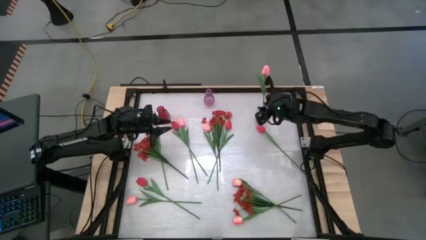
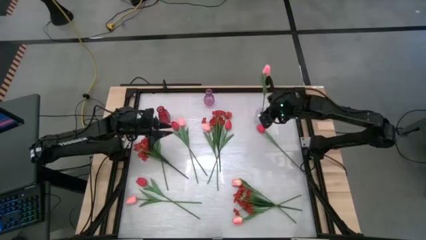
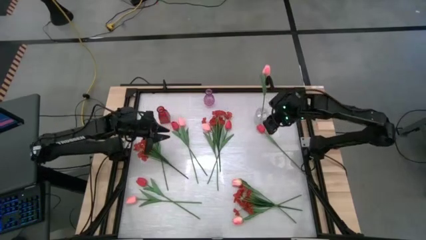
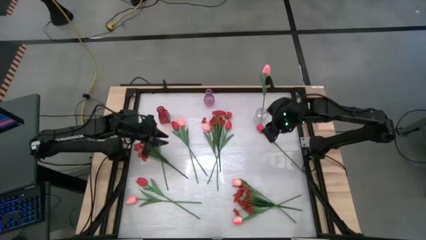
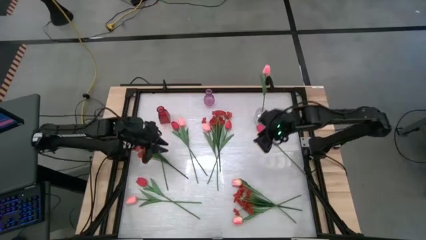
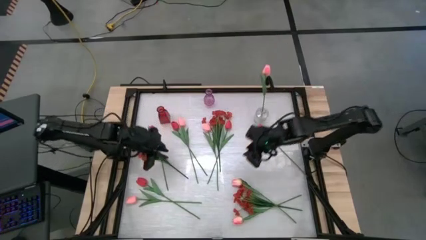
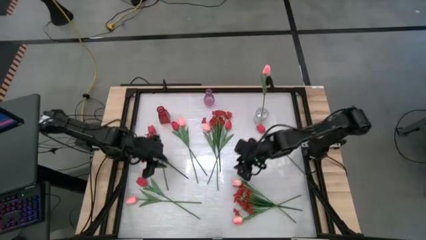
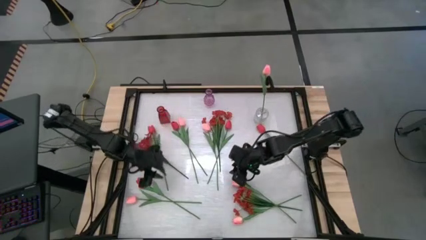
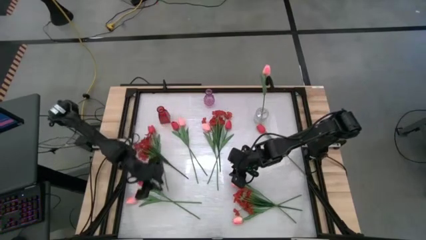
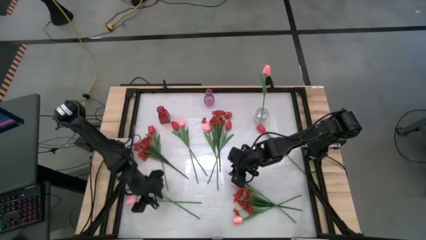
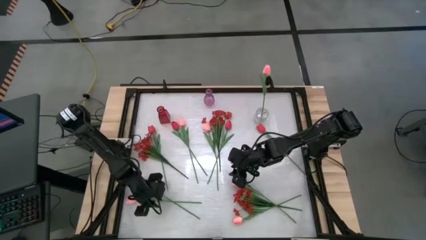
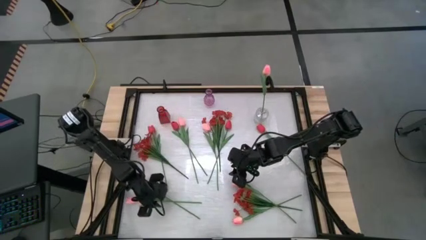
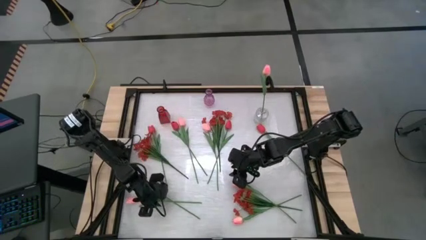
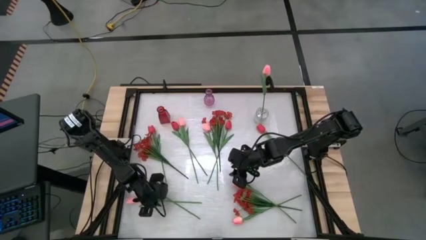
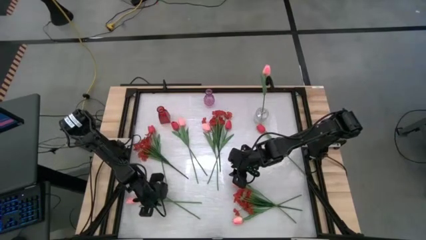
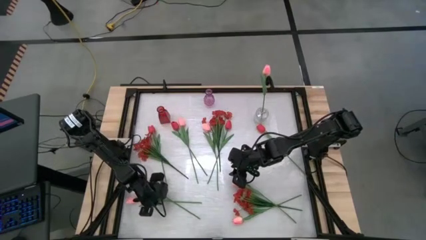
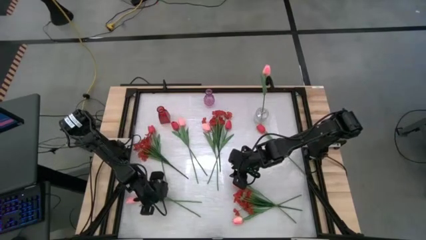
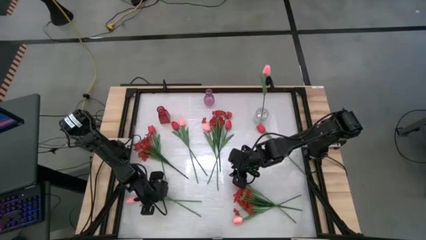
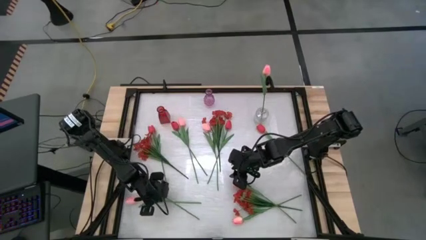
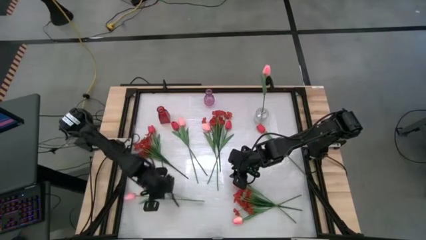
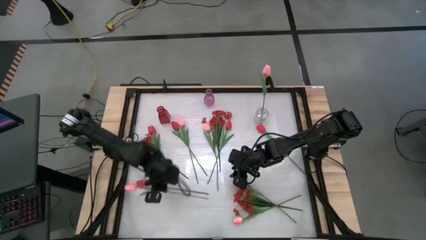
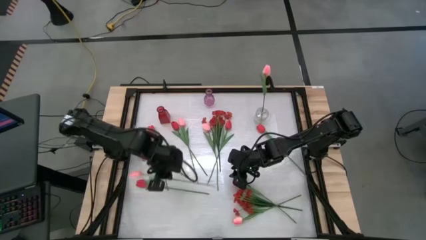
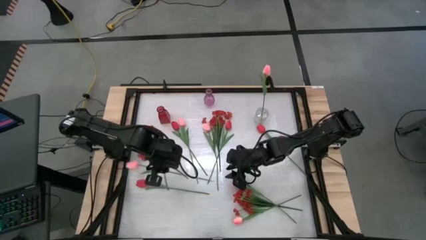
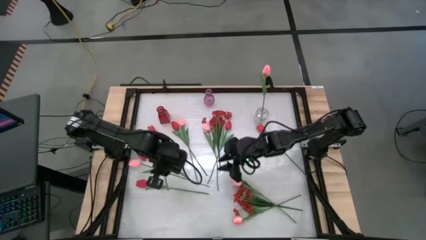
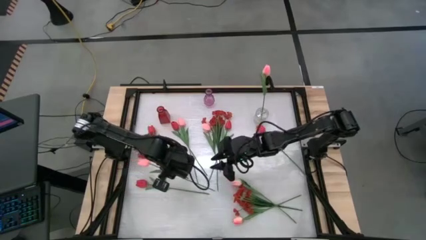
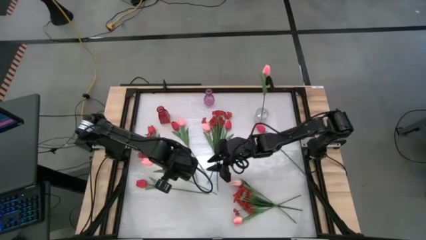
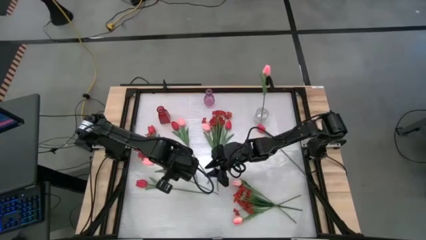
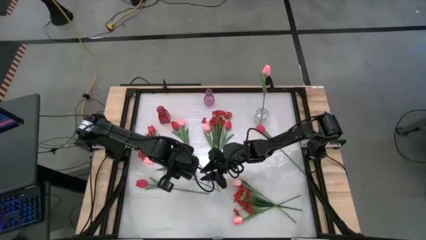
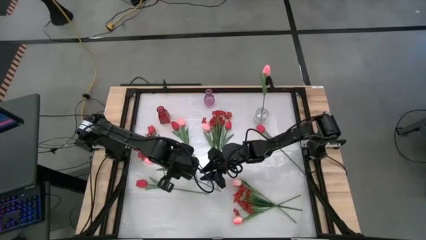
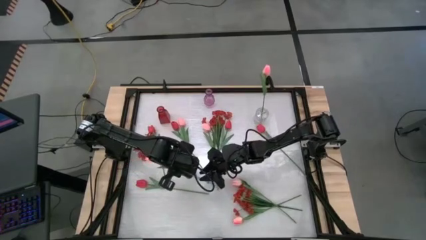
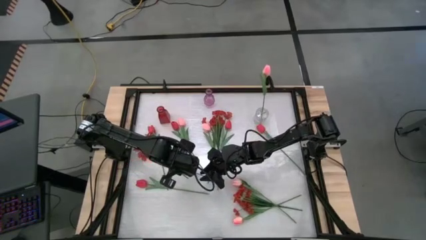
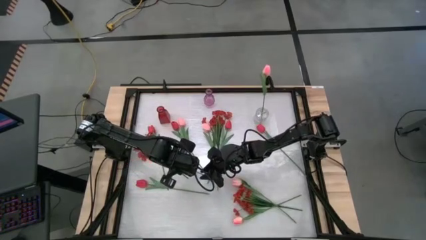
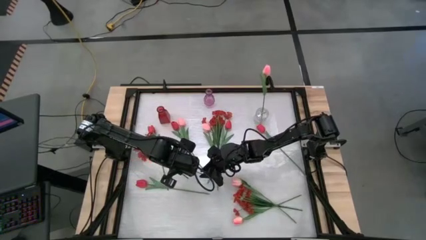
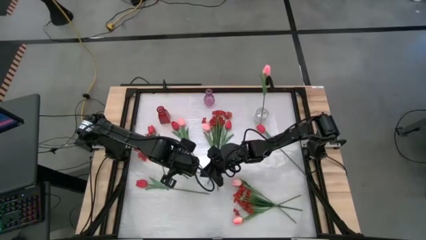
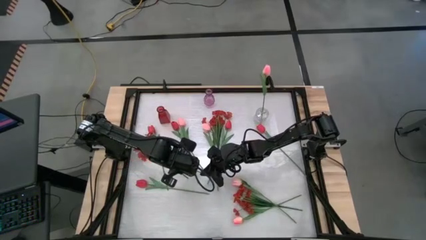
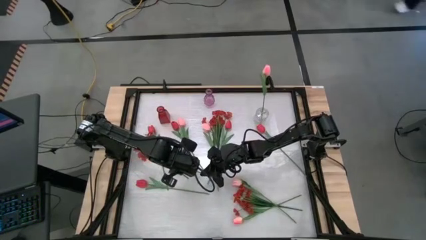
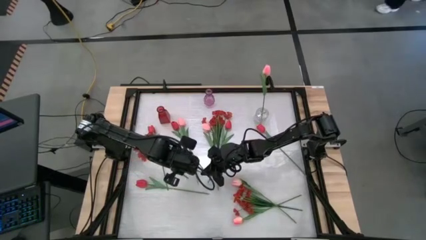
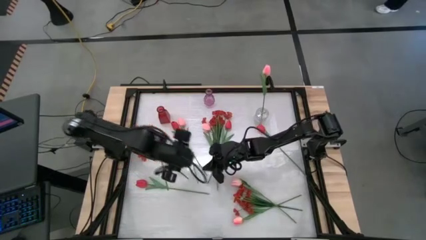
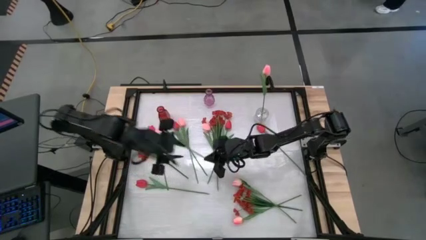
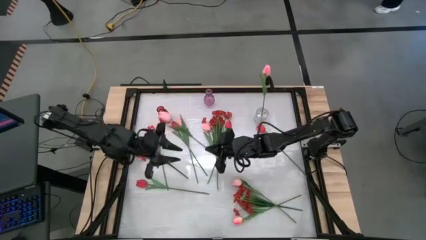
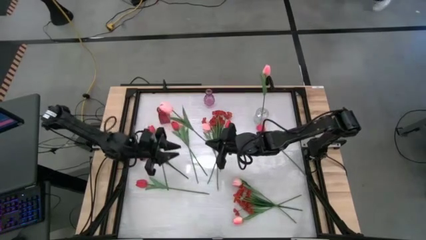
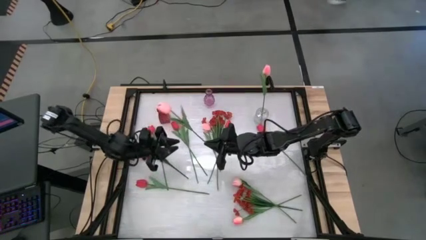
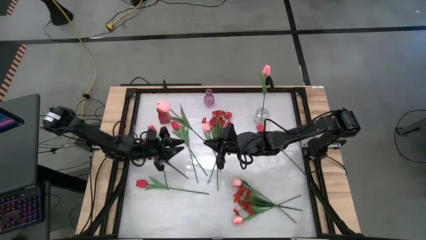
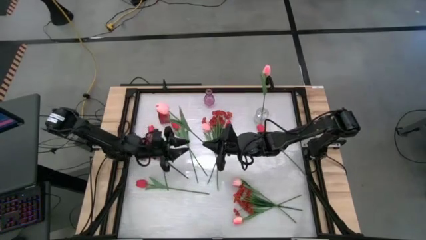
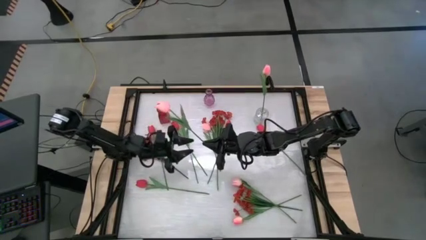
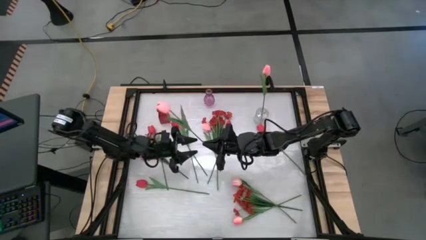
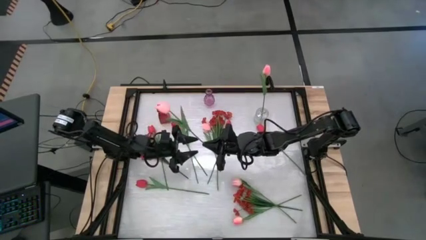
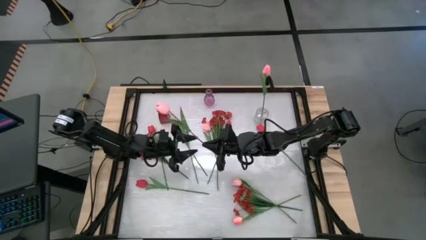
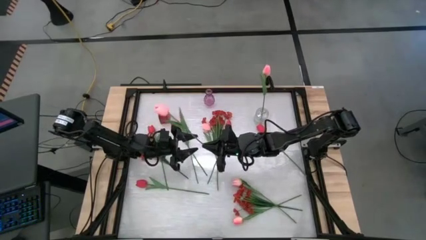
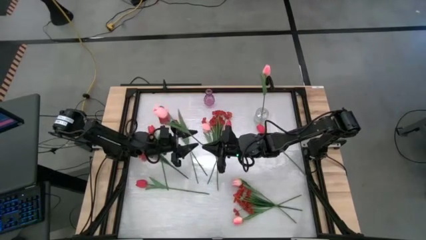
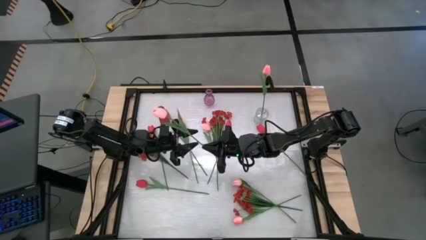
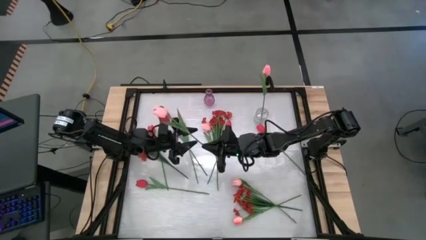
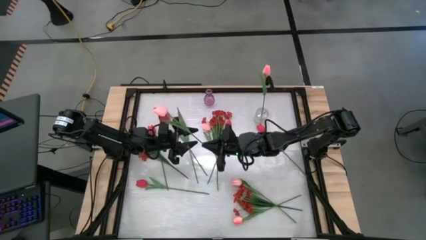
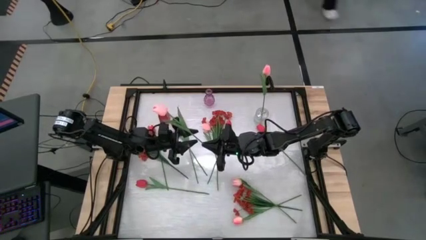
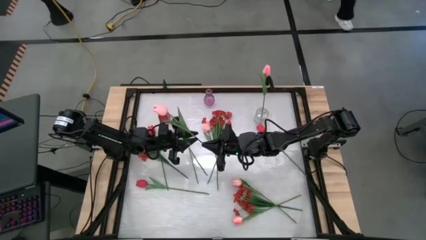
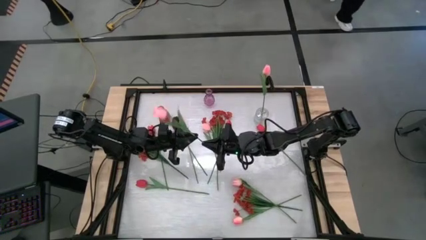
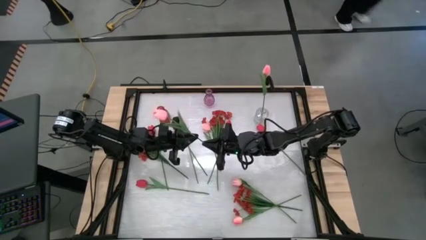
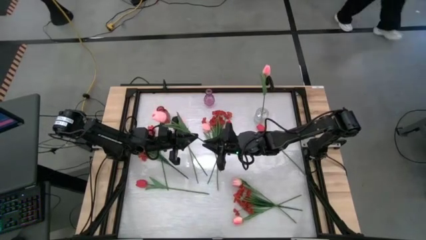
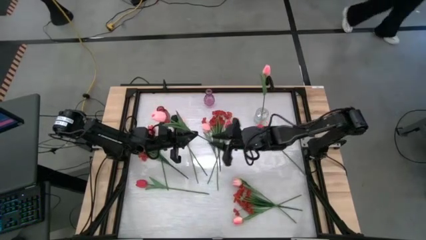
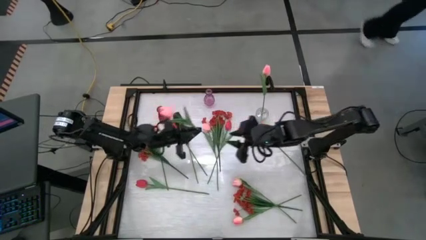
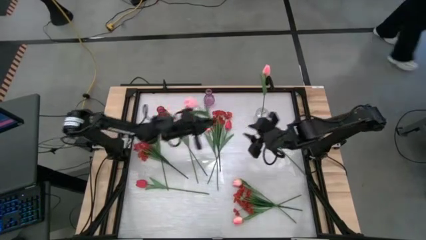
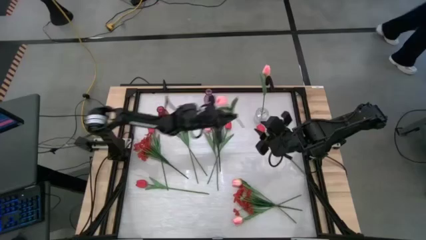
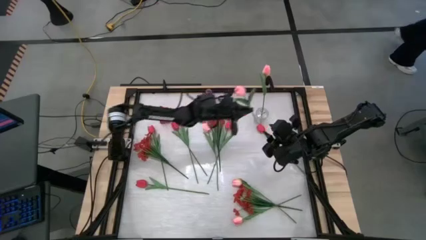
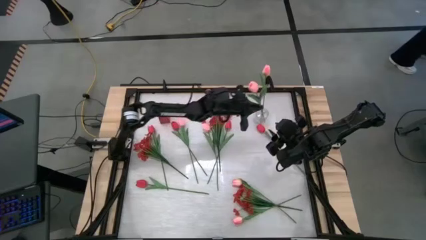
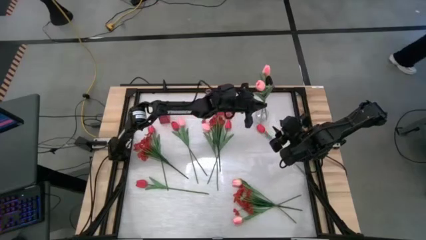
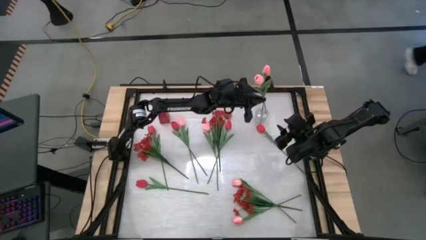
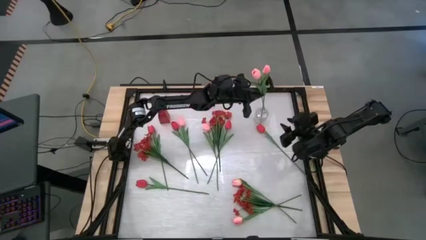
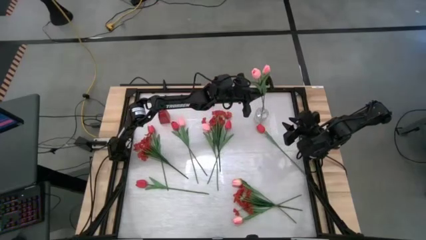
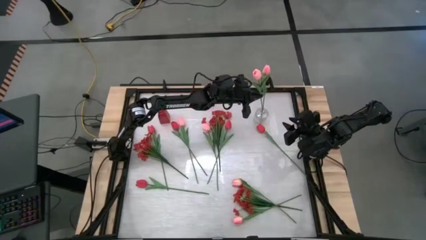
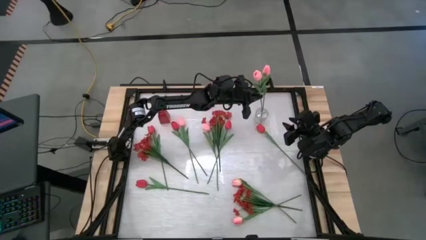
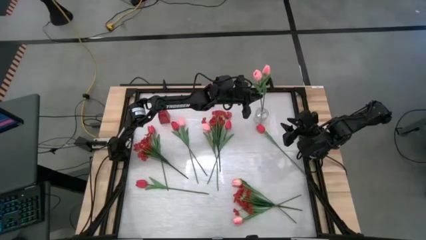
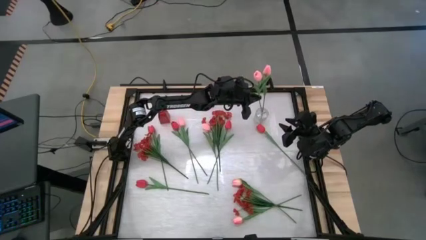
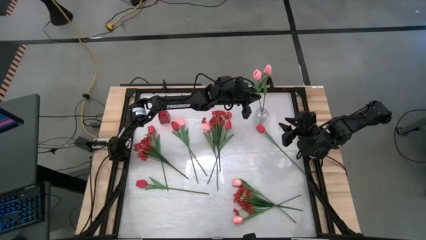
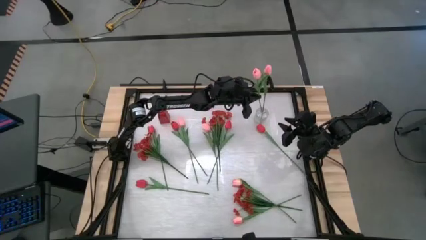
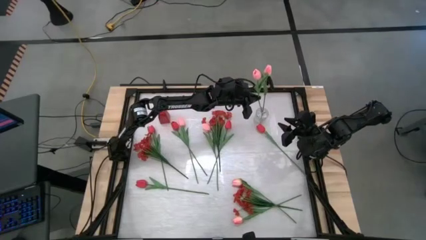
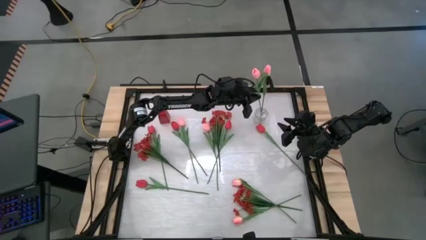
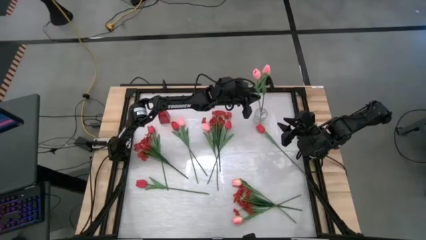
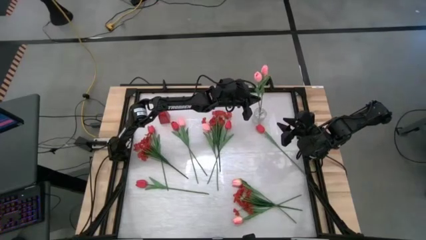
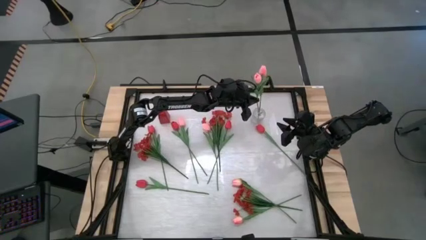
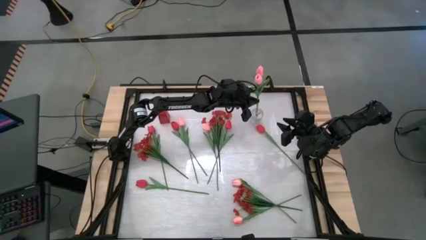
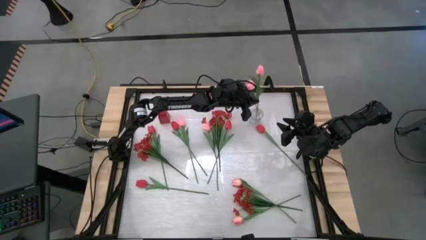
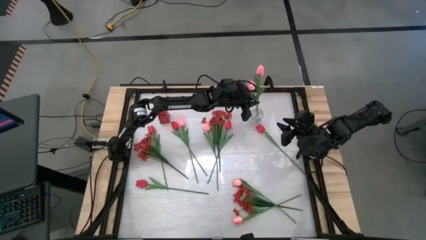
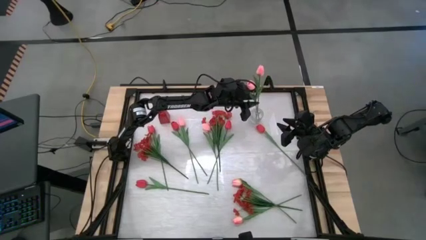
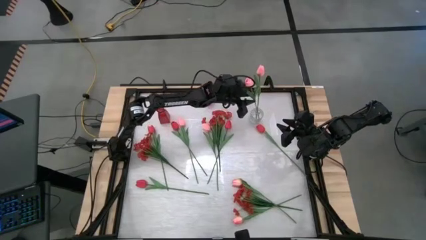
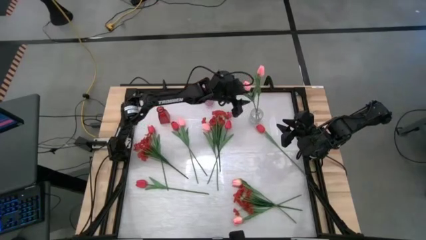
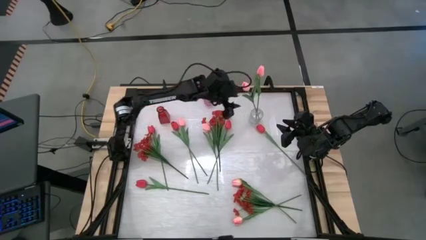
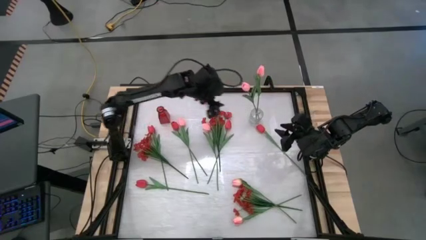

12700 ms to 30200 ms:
Task: Sort flowers into vase by color
Put the bottom left pink tulip into the transparent vase
